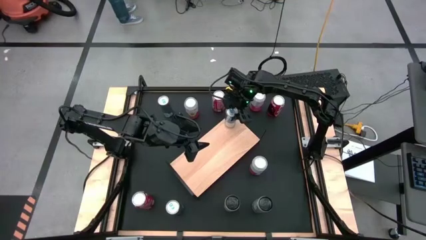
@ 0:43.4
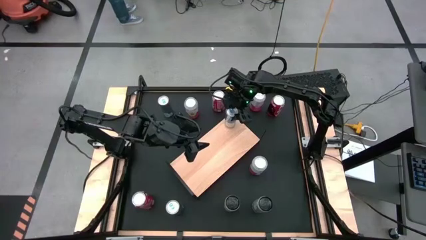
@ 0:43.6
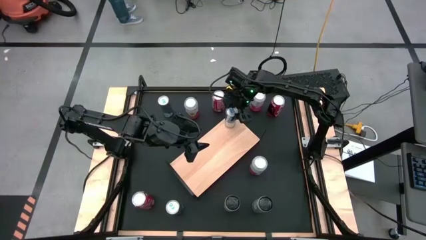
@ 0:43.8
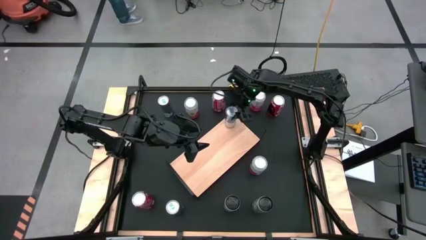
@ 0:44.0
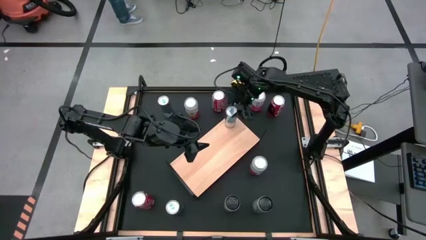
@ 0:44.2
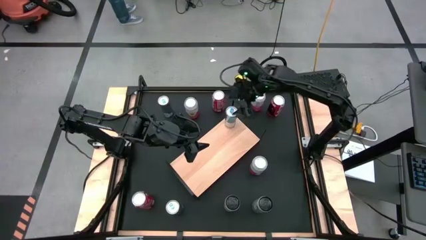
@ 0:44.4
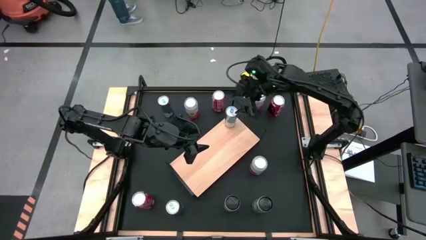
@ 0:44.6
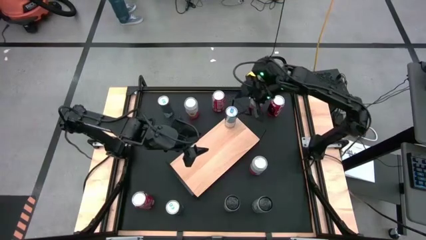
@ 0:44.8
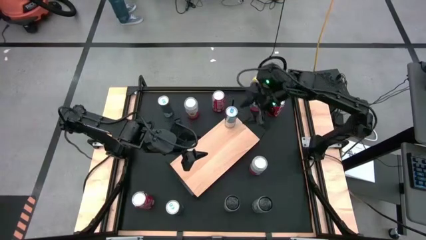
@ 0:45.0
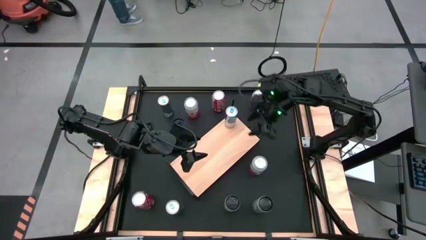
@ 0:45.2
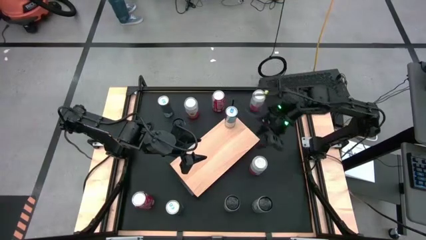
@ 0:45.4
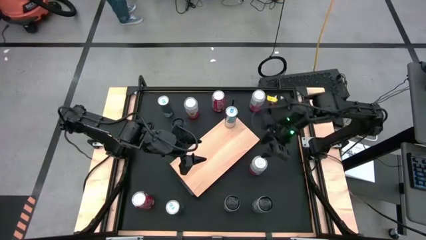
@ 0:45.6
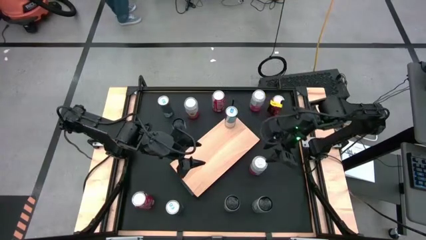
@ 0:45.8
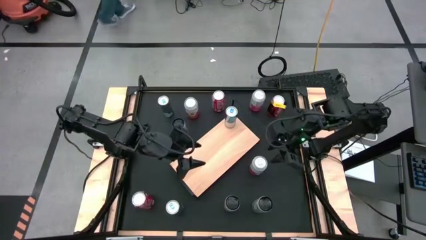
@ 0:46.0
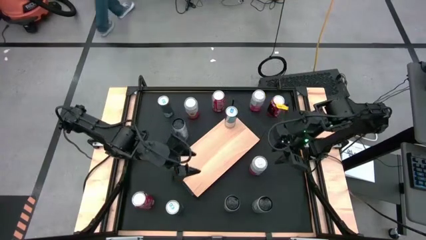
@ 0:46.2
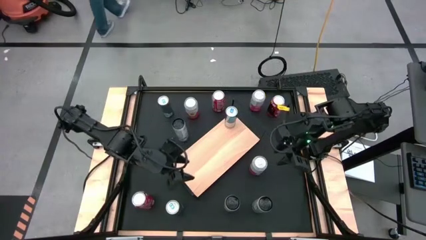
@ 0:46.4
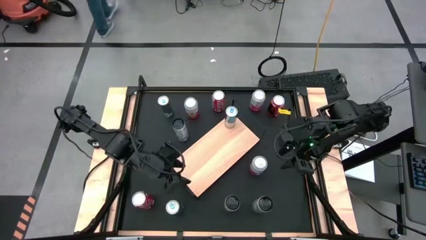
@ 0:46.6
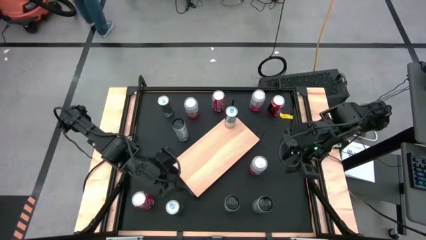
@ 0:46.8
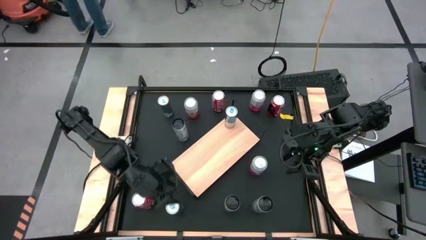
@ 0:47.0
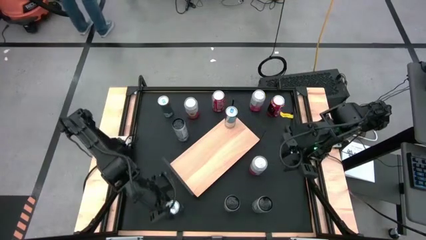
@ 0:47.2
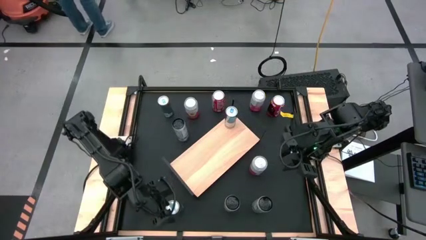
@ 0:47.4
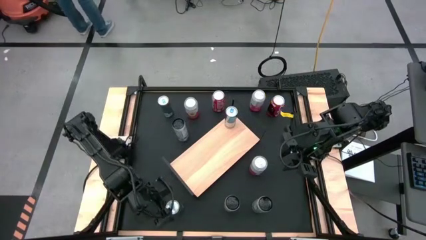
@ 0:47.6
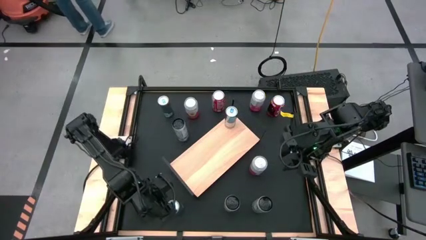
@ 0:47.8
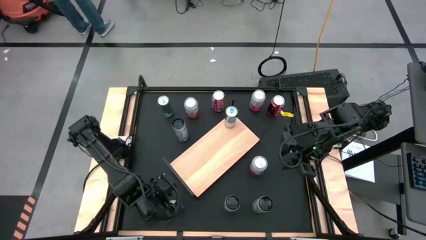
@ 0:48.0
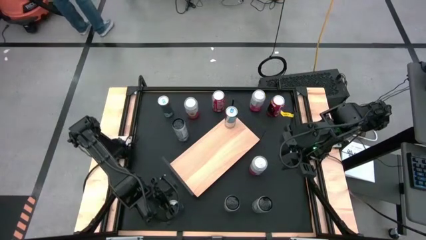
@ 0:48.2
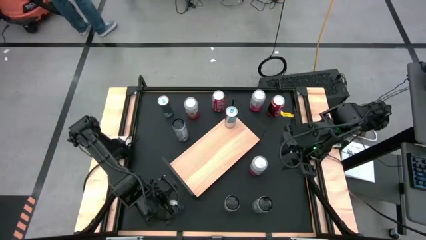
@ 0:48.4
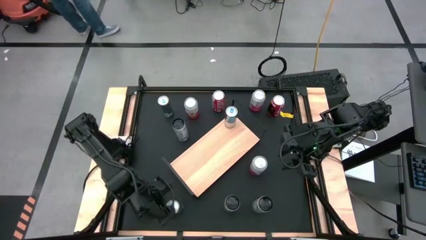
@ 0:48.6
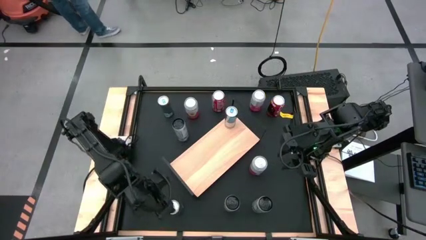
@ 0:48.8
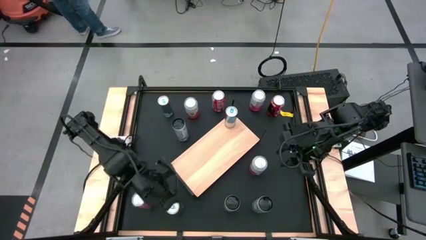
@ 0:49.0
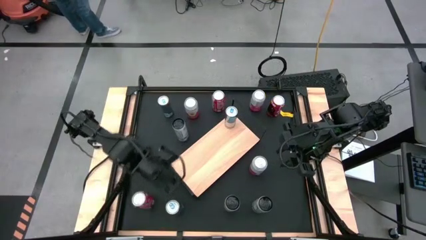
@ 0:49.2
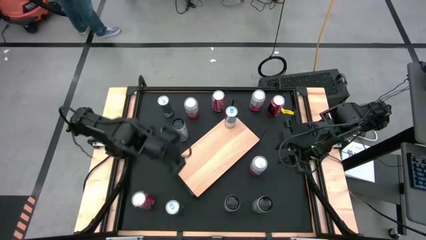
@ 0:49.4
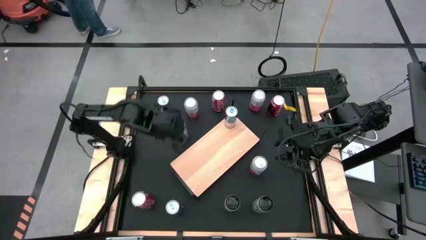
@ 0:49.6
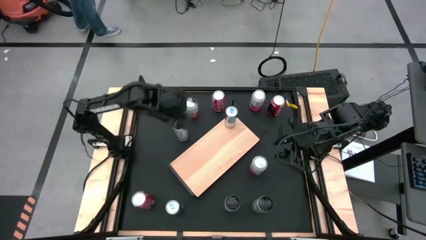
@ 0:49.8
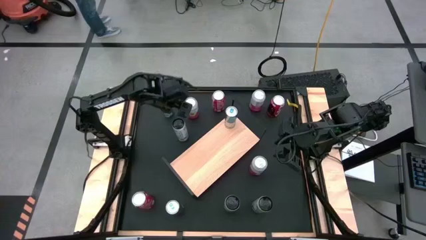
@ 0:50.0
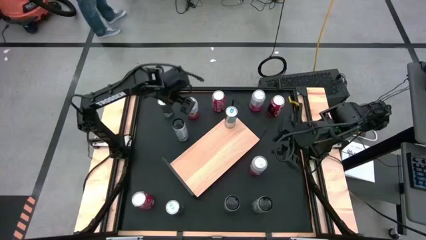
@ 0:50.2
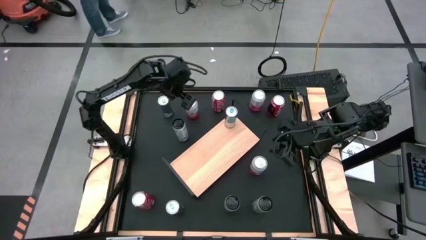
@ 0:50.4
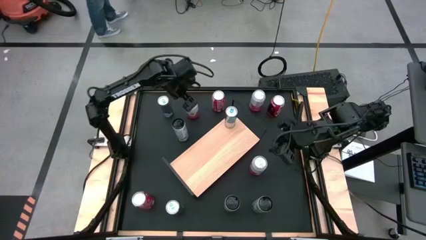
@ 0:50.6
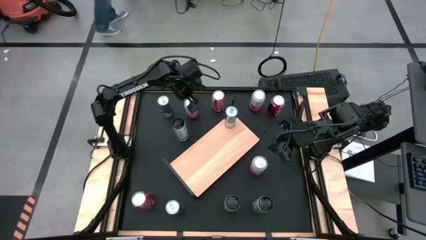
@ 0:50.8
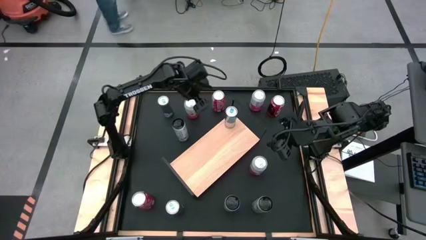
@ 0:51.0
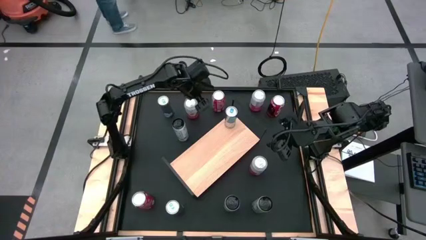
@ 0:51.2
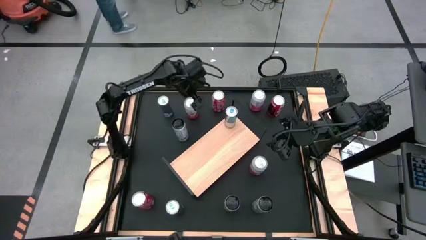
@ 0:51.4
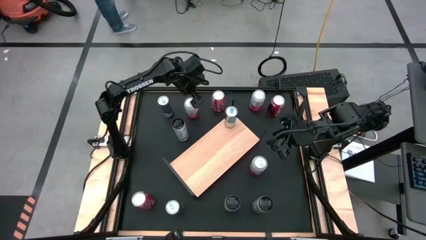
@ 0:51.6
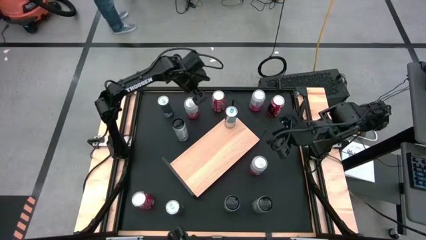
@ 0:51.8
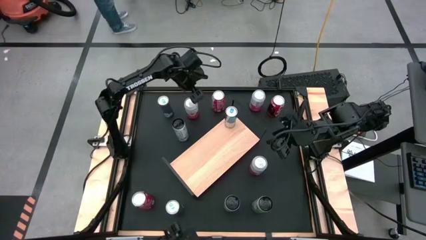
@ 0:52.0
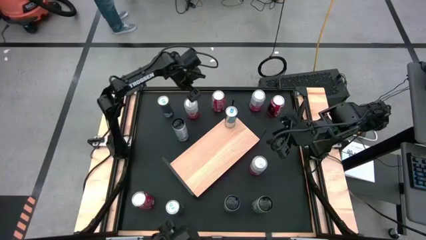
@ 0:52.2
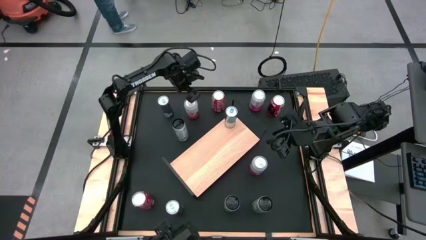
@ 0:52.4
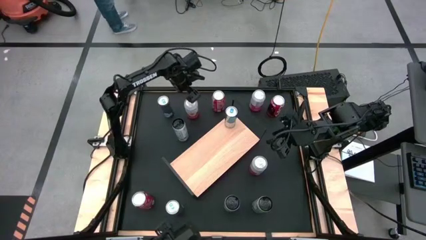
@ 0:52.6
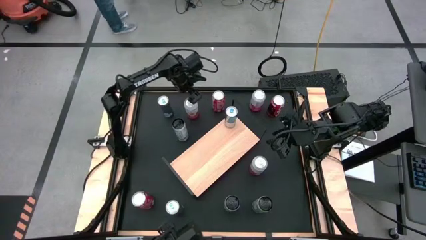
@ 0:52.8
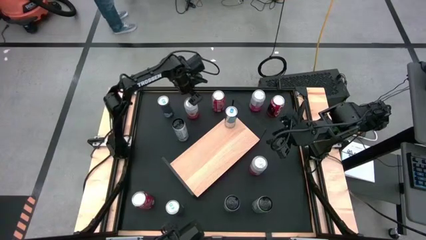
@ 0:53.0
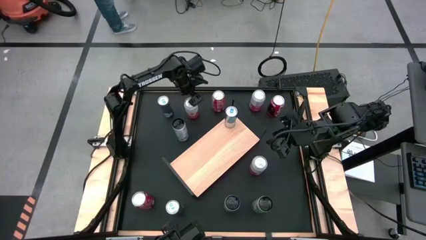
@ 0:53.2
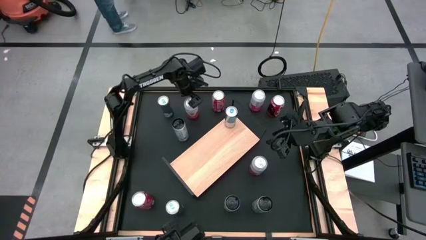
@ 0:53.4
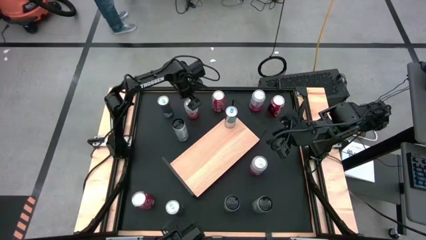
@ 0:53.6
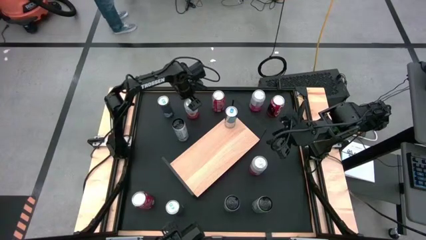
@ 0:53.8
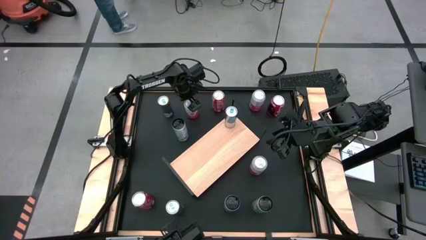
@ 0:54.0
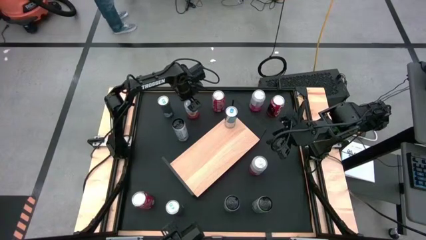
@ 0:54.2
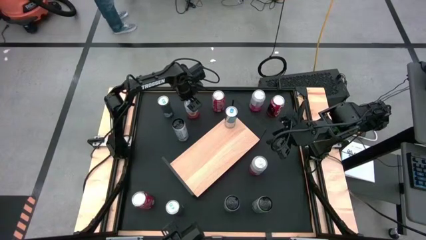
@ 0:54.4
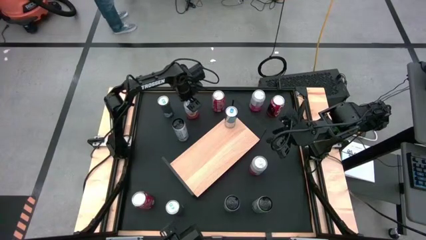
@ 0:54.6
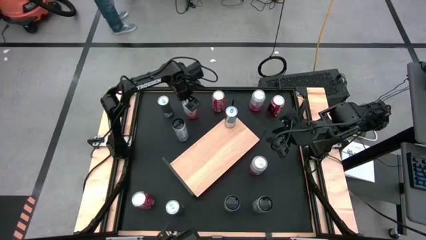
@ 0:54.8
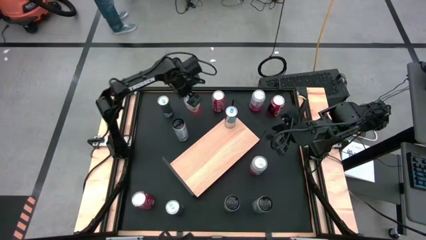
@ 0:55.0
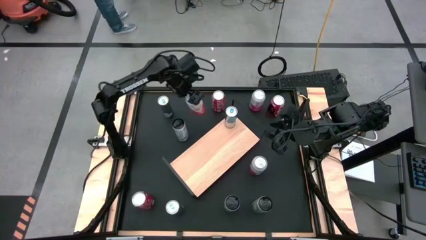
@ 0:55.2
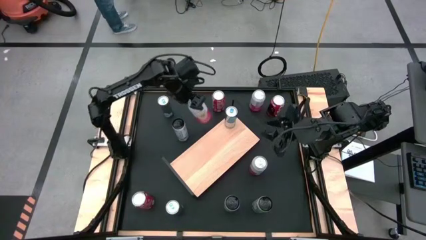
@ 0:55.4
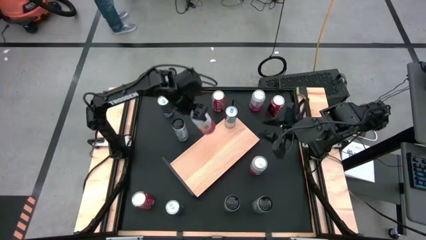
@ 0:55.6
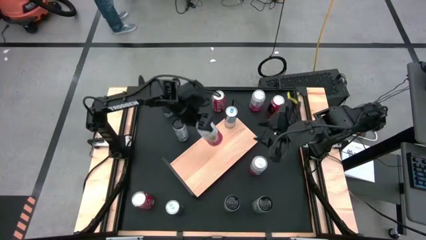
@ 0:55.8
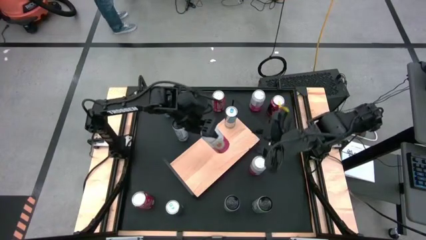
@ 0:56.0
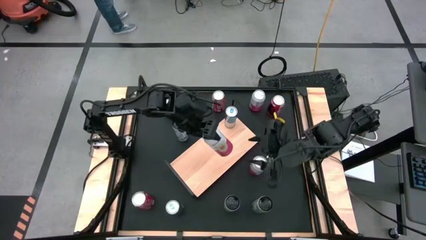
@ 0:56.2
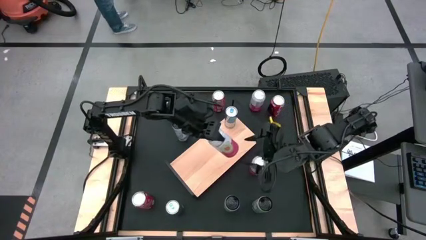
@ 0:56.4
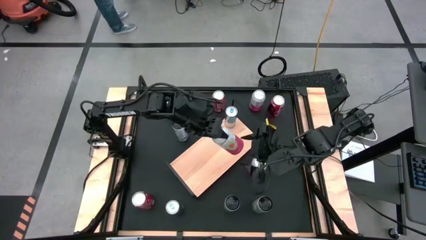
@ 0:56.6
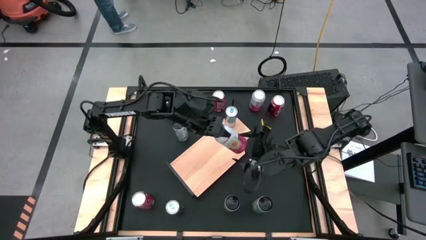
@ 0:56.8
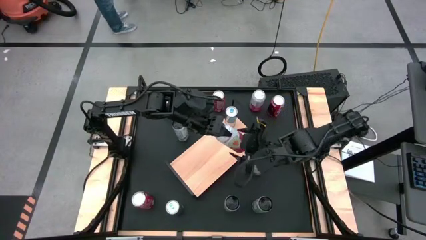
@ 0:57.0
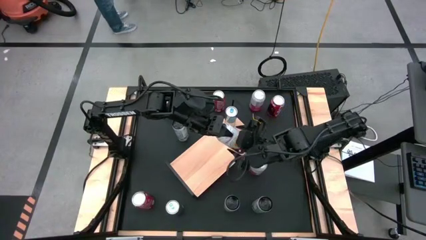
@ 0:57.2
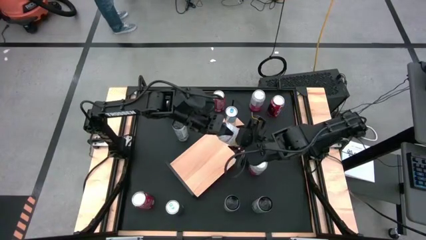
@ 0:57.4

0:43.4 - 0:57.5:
Task: Place canned beverage on shelf
Put the top left pink soda can on the shelf
